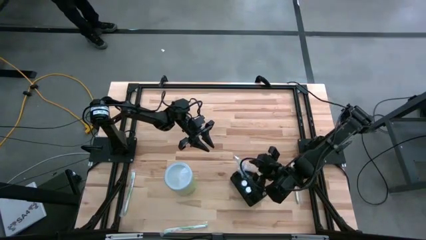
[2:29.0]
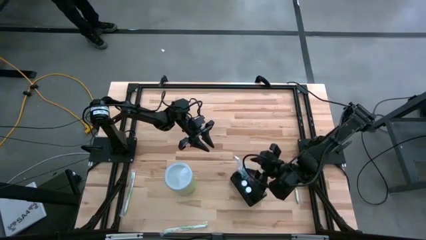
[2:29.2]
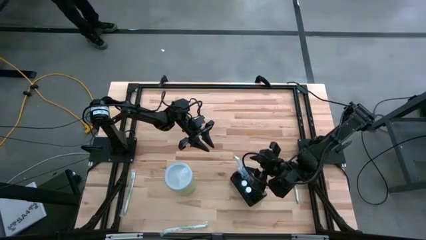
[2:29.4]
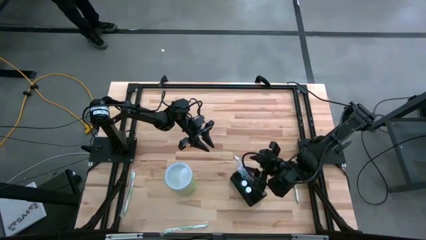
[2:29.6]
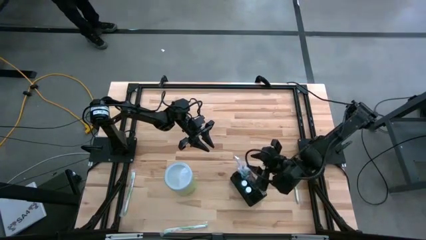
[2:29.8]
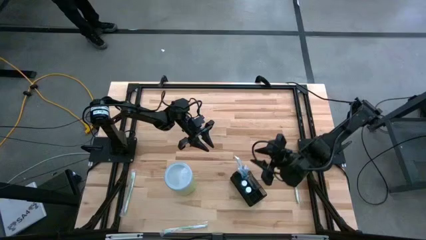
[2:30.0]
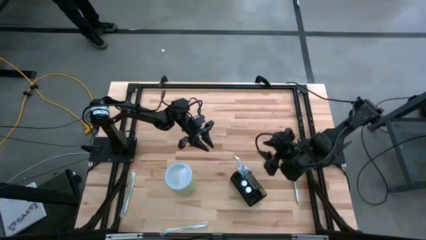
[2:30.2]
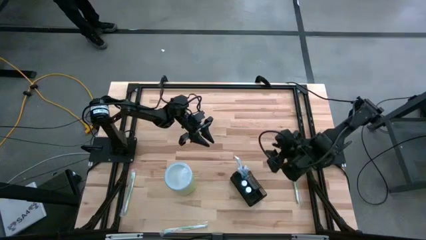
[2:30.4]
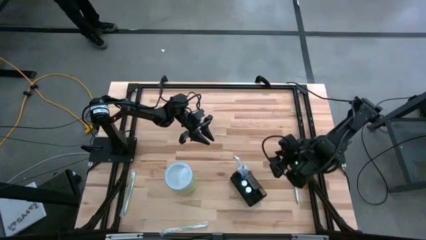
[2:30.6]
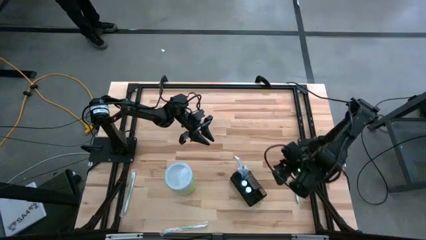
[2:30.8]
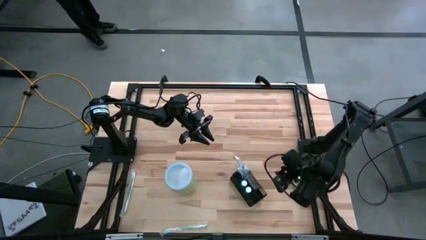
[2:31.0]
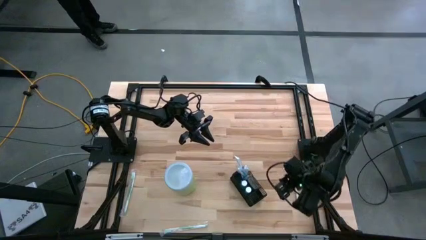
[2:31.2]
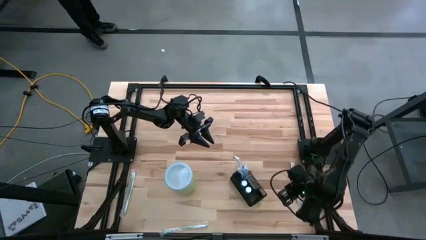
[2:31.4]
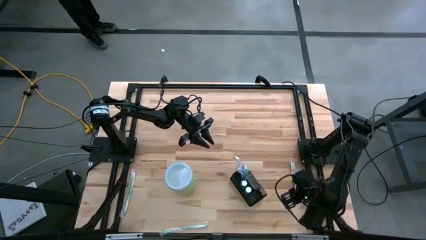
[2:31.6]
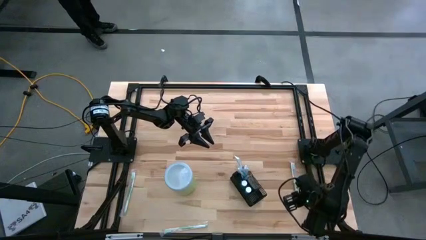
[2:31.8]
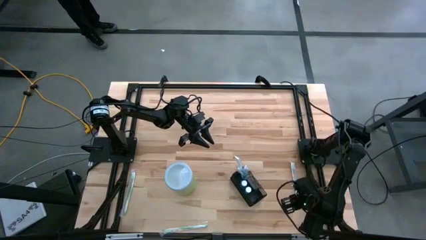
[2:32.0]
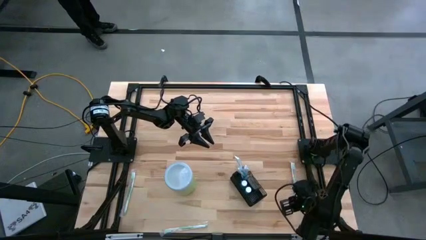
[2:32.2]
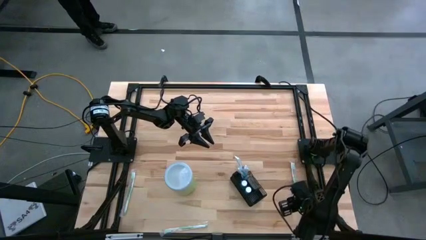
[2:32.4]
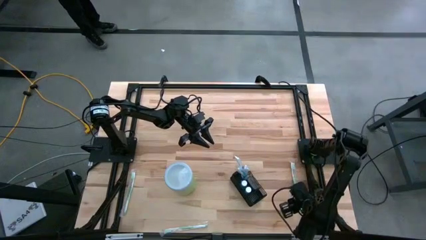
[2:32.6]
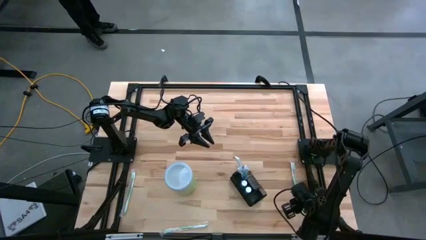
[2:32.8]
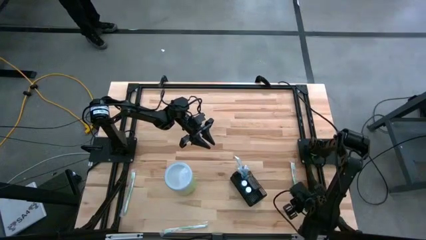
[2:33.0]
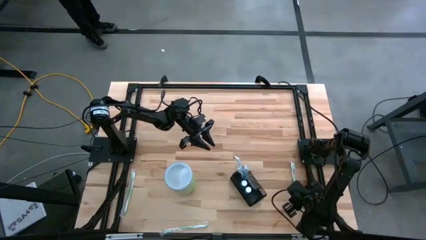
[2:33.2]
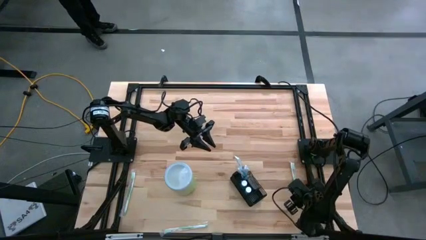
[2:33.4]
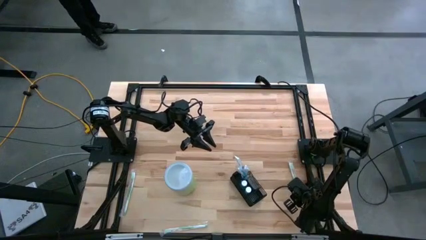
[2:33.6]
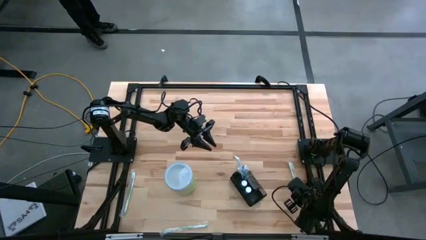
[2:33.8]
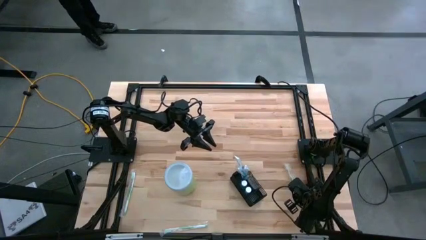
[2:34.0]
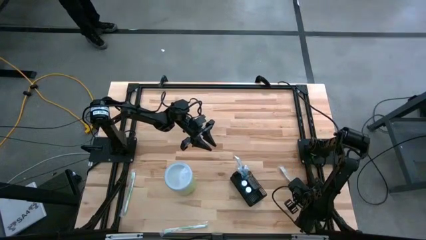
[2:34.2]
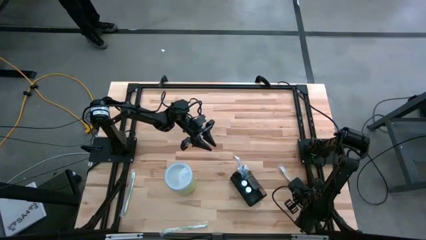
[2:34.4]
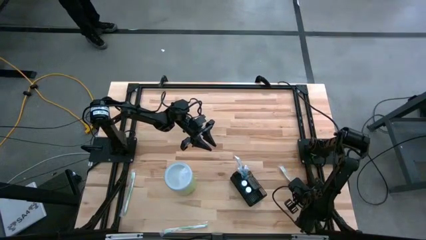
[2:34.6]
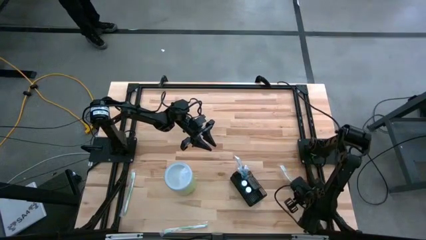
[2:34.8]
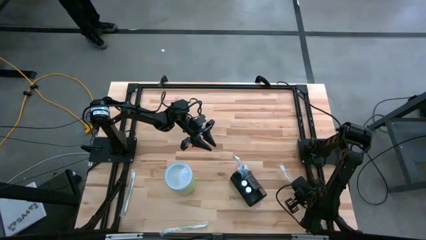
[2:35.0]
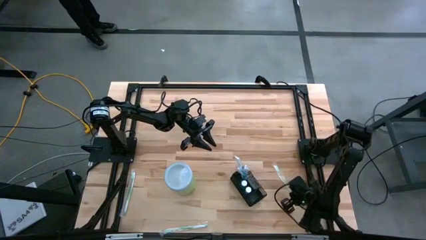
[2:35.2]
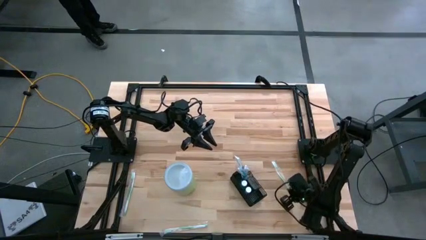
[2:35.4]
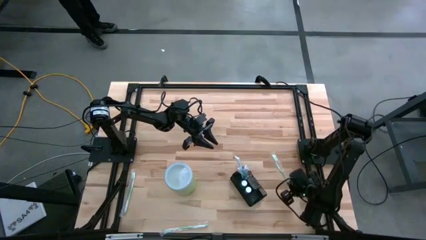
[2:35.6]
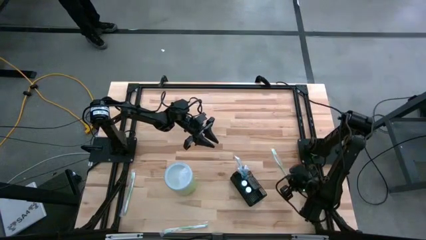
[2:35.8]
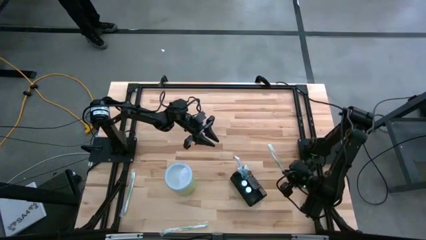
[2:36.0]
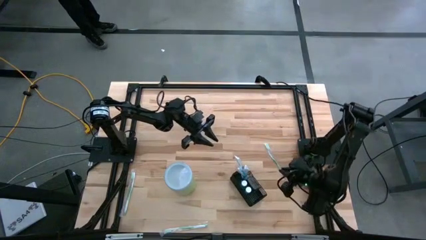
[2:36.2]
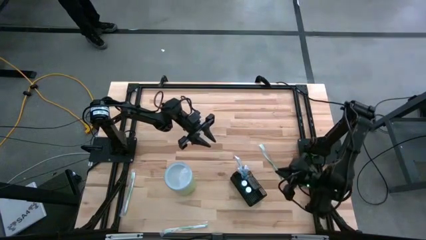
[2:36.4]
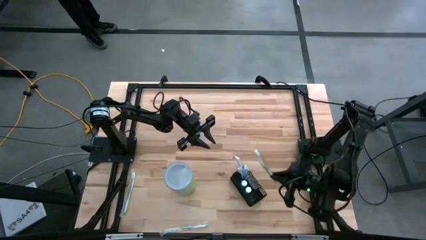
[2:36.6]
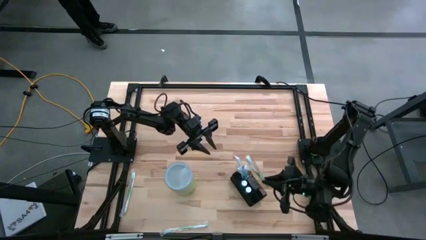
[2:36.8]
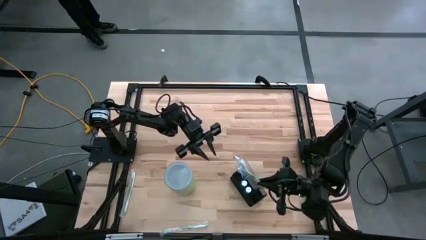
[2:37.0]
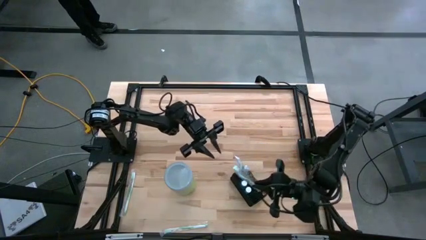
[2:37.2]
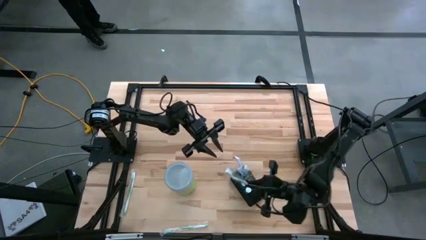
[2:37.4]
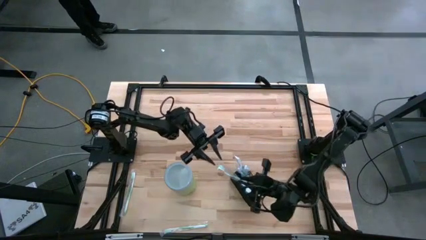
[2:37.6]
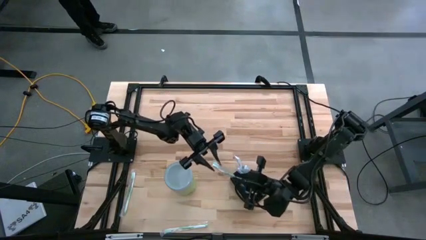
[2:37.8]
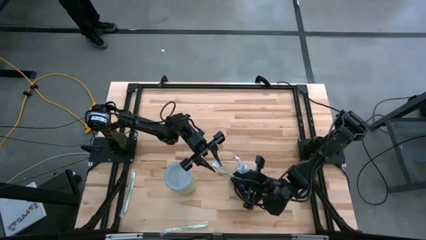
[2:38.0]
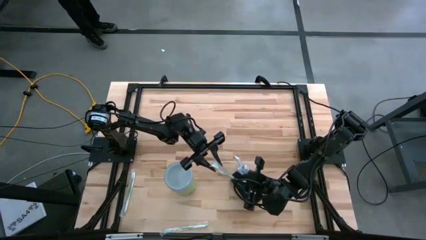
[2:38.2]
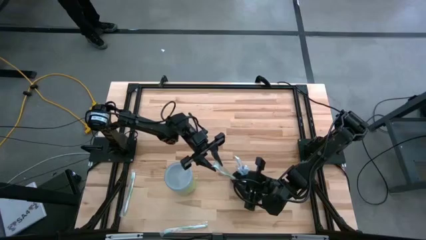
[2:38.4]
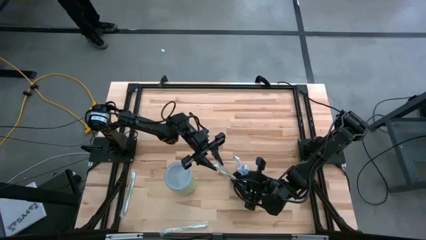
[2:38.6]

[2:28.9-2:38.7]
Task: Pick & Place toothbrushing station
Put the right green toothbrush into the black mesh organizer

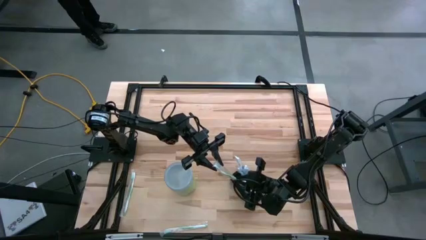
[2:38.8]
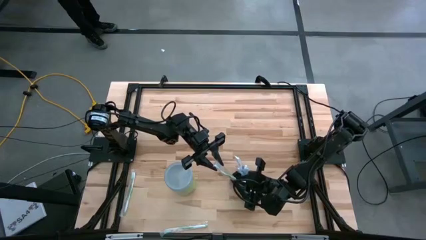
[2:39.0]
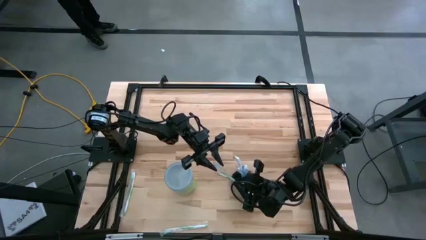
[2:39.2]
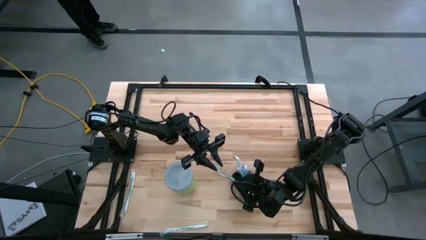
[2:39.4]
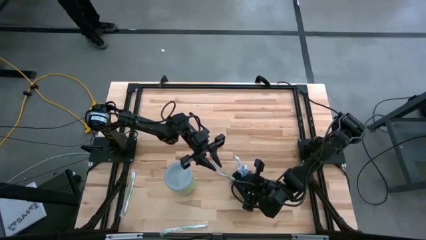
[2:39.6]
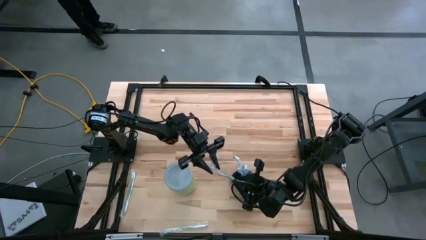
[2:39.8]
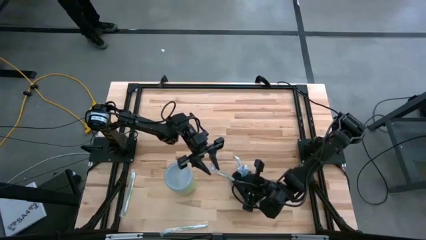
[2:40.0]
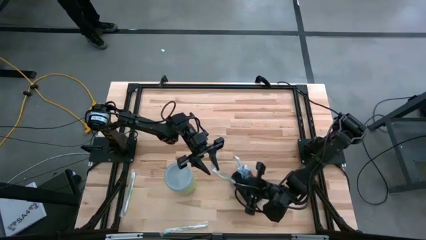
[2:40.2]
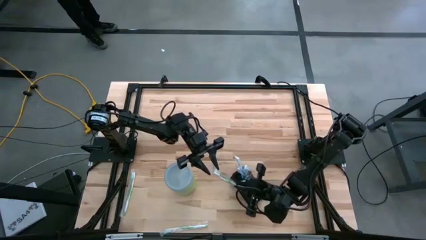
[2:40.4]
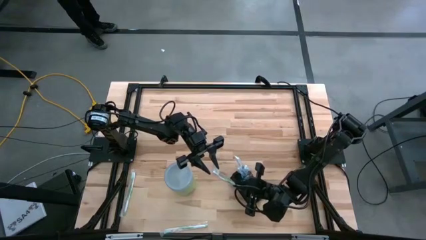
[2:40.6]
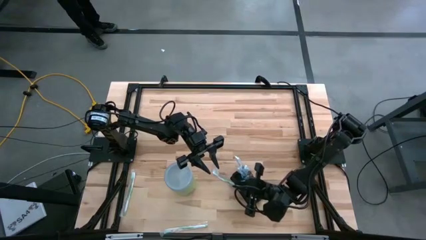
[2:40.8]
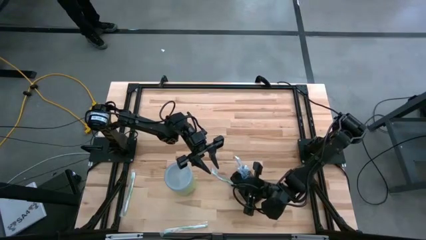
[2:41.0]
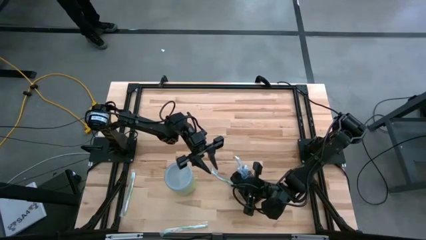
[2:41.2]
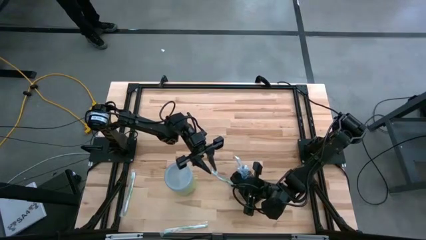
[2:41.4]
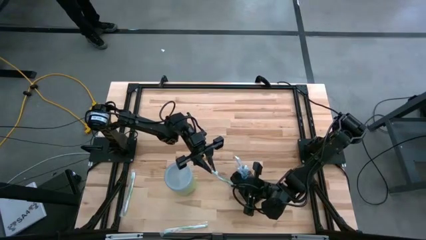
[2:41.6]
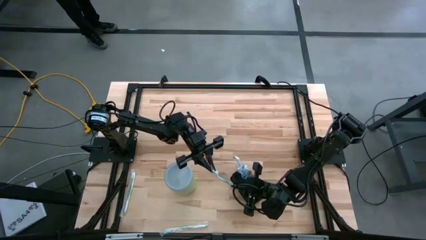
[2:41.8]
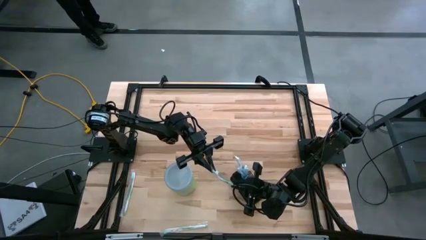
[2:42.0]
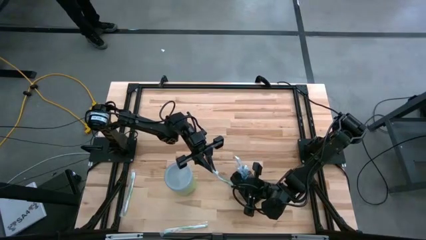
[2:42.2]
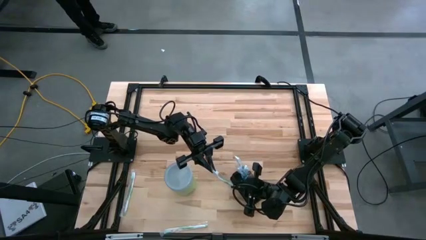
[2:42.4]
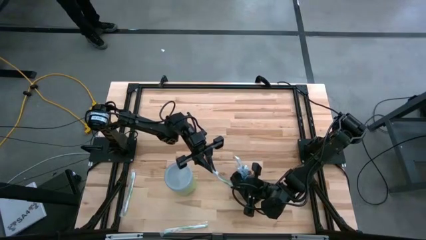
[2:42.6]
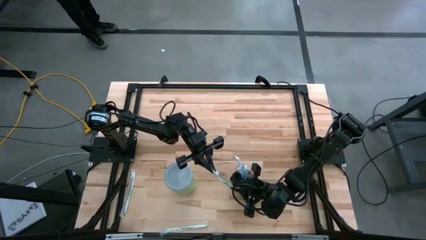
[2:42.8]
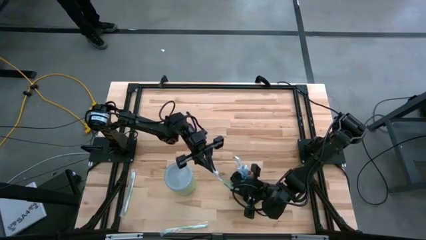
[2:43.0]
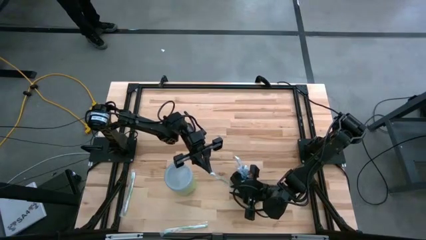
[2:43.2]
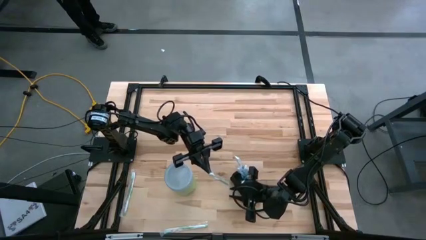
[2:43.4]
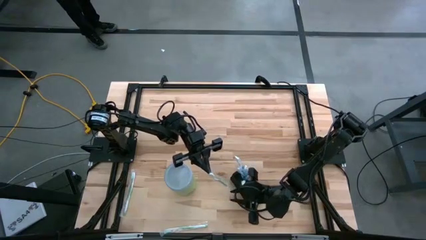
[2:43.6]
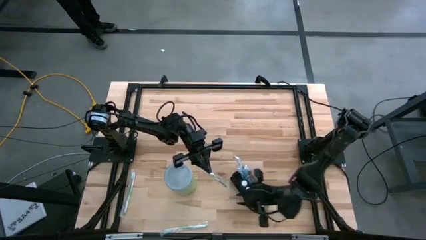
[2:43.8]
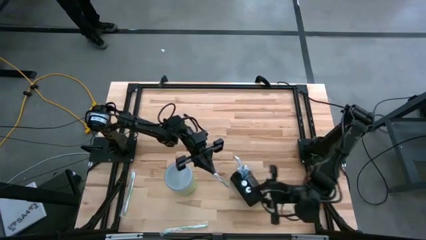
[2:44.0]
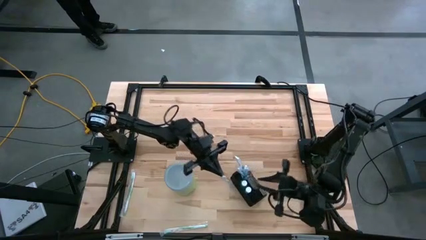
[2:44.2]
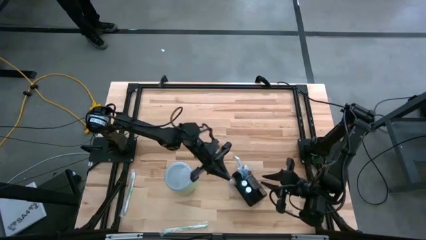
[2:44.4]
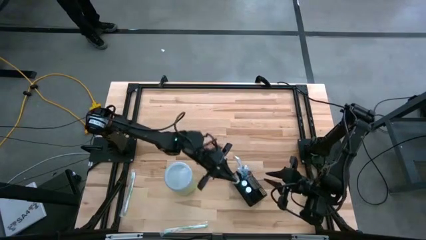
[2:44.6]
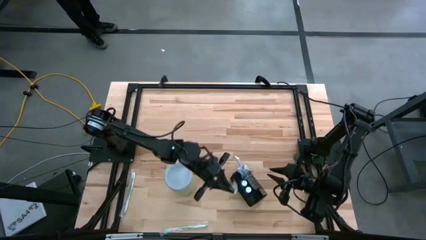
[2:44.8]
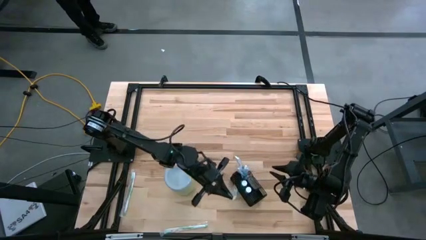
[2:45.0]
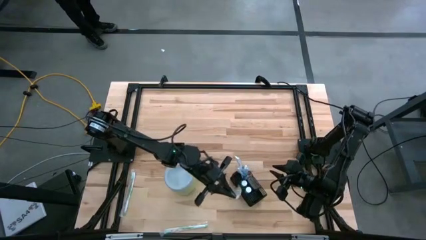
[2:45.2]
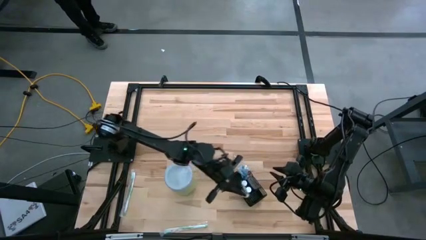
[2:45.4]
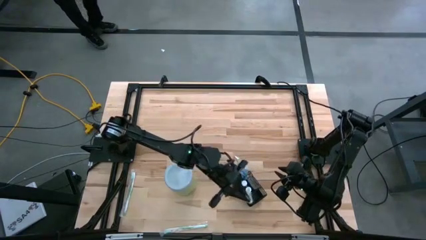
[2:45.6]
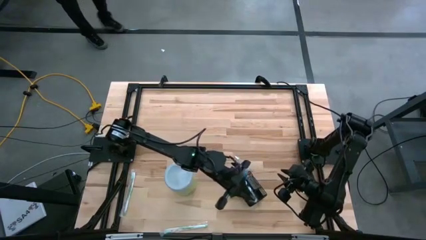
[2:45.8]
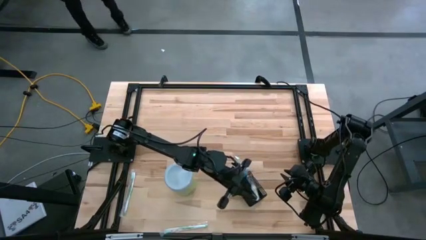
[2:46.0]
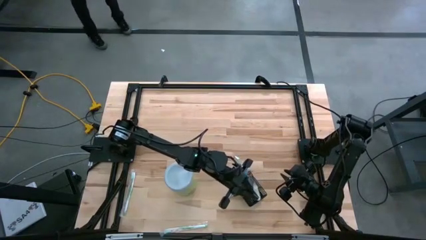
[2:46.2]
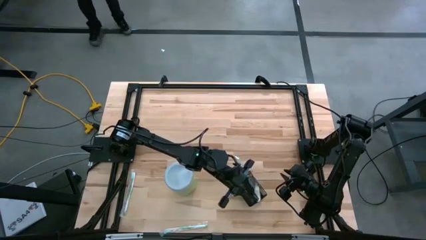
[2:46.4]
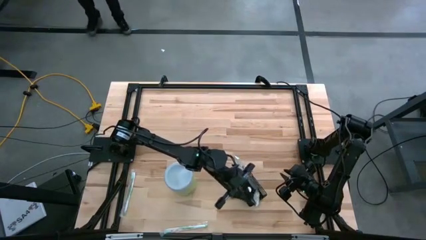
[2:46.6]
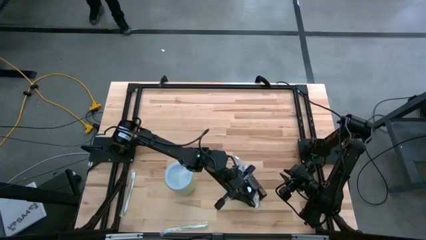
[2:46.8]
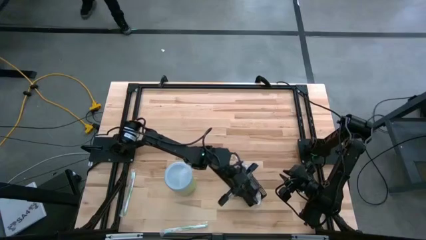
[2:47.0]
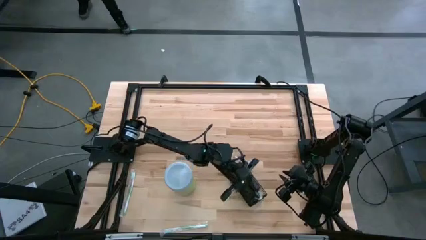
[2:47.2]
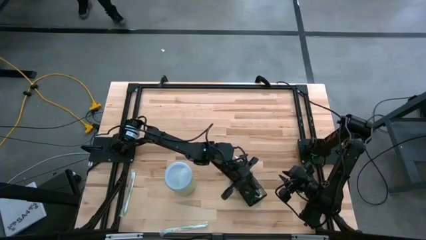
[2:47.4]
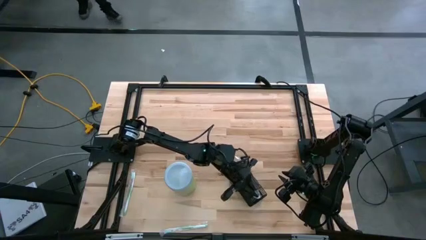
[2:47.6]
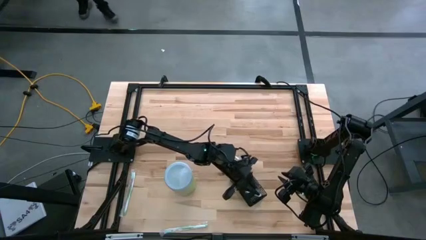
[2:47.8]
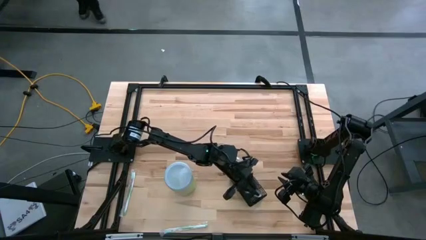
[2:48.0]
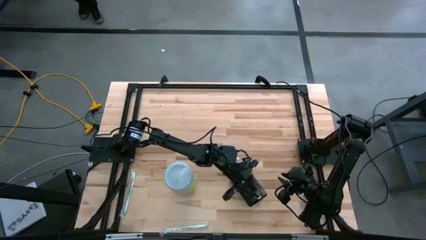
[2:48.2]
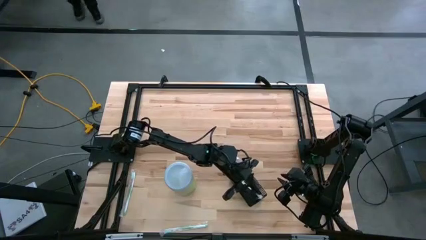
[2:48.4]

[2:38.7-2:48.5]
Put the right green toothbrush into the black mesh organizer
